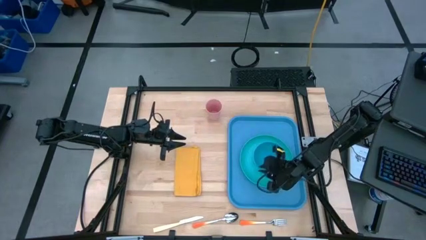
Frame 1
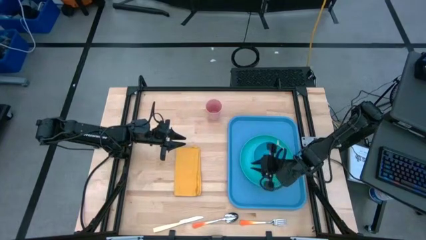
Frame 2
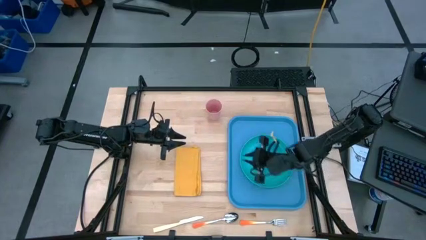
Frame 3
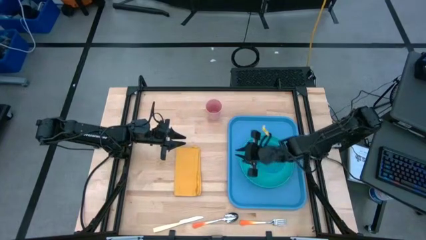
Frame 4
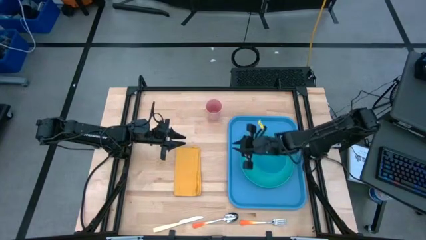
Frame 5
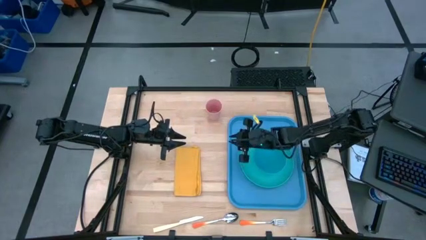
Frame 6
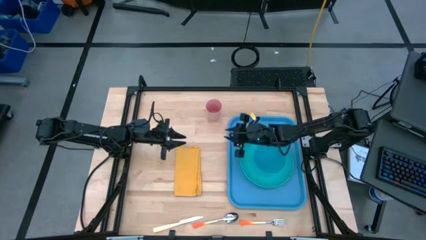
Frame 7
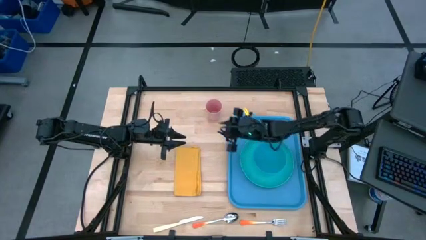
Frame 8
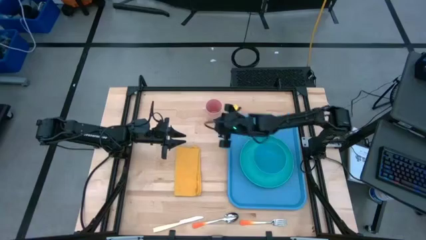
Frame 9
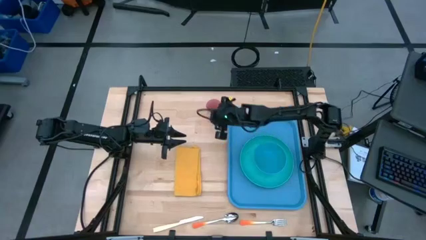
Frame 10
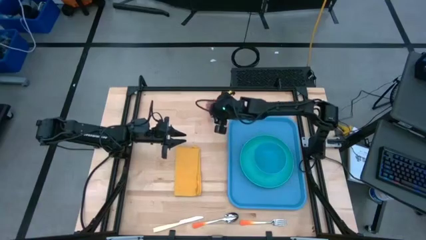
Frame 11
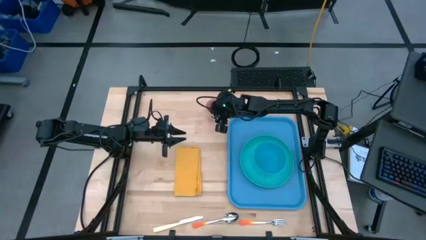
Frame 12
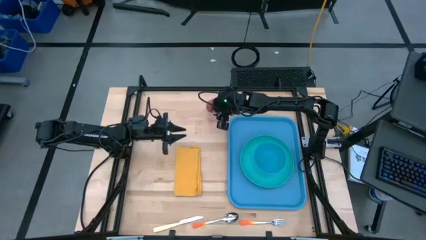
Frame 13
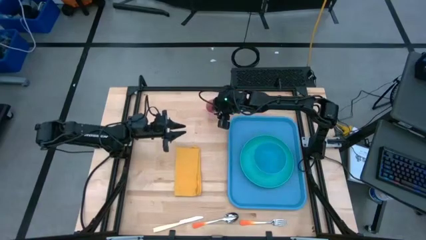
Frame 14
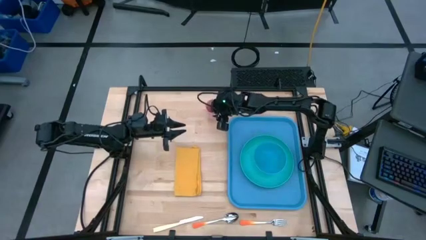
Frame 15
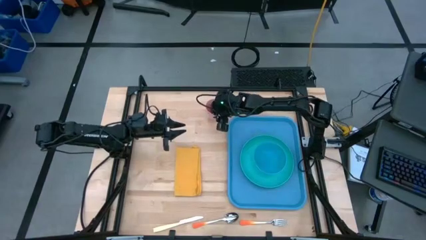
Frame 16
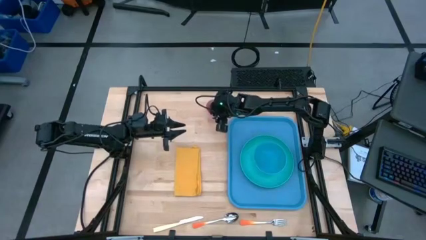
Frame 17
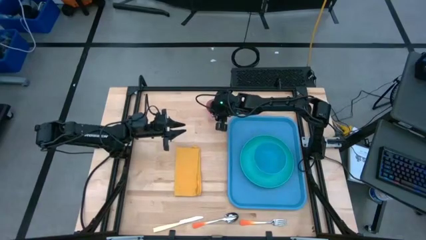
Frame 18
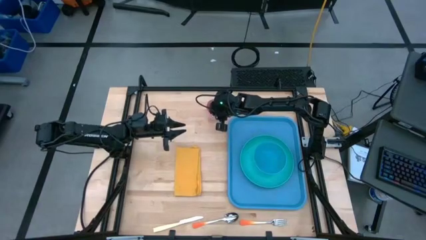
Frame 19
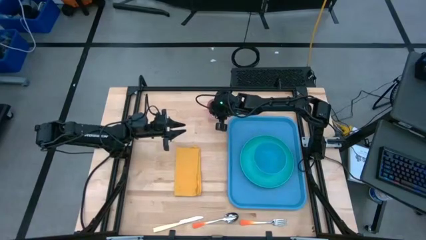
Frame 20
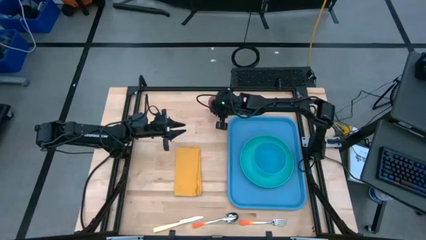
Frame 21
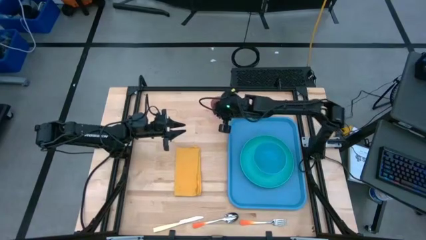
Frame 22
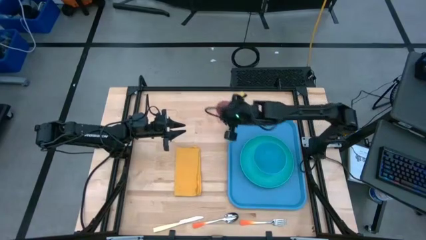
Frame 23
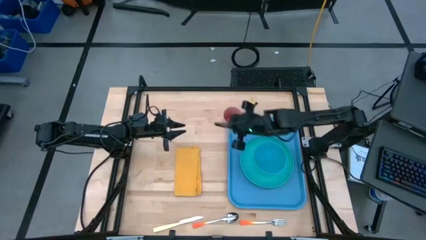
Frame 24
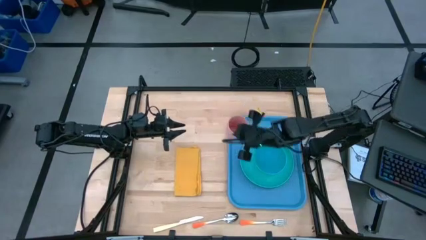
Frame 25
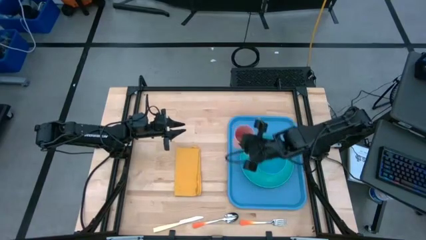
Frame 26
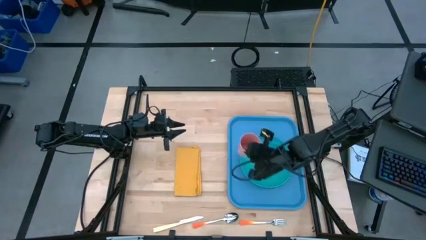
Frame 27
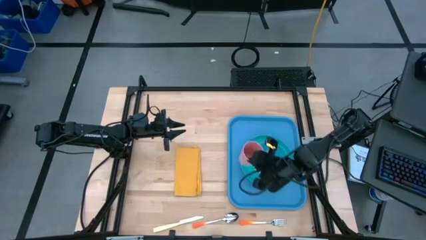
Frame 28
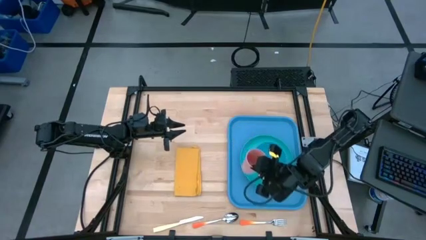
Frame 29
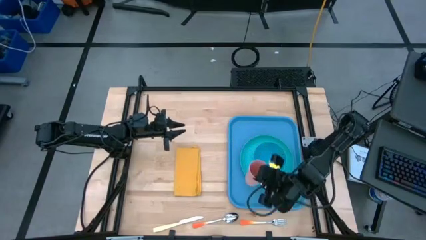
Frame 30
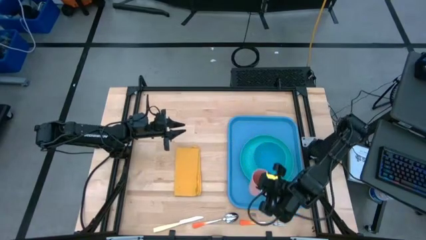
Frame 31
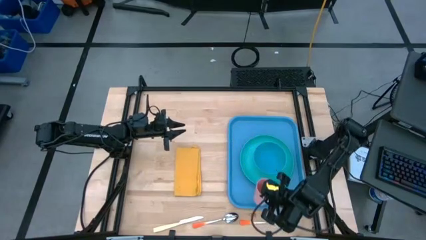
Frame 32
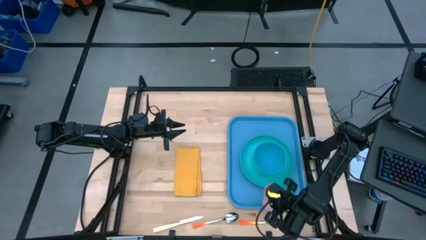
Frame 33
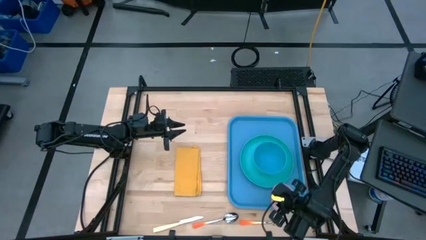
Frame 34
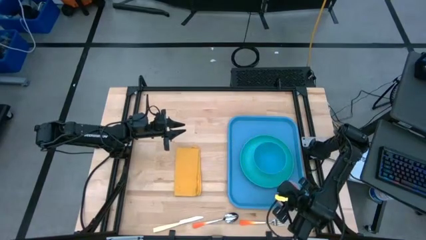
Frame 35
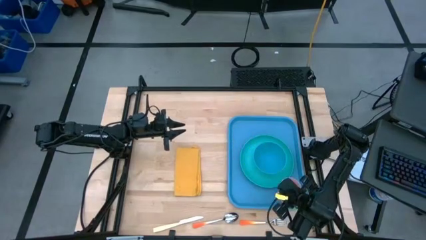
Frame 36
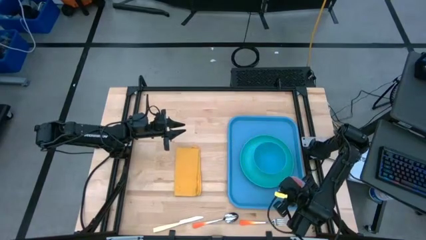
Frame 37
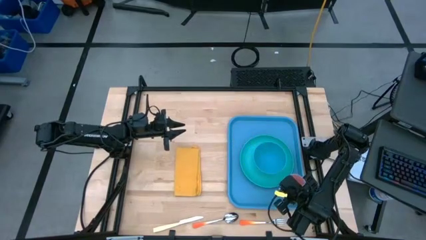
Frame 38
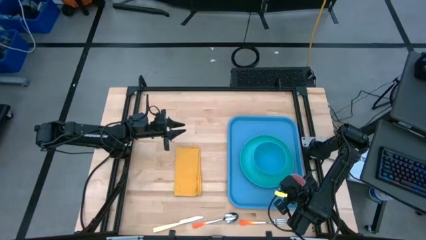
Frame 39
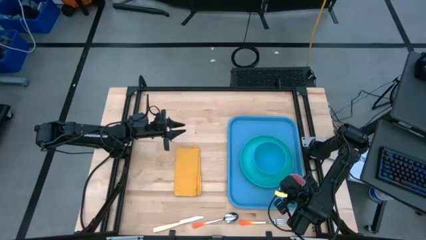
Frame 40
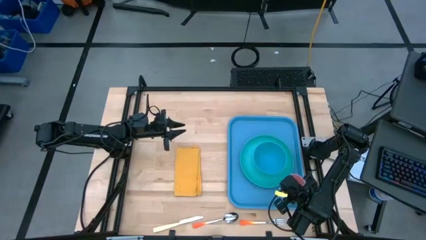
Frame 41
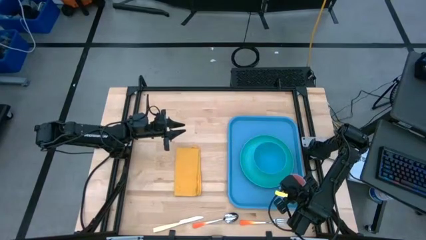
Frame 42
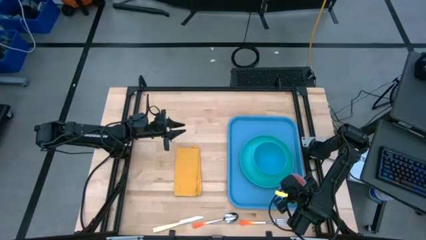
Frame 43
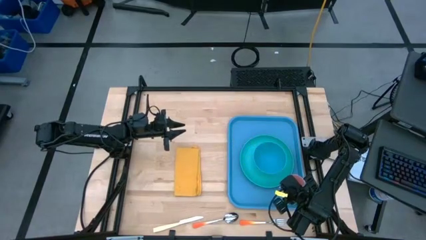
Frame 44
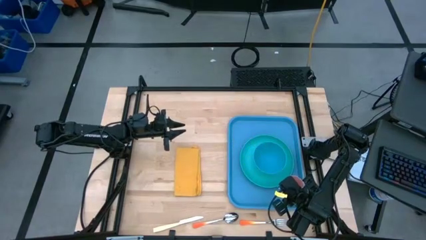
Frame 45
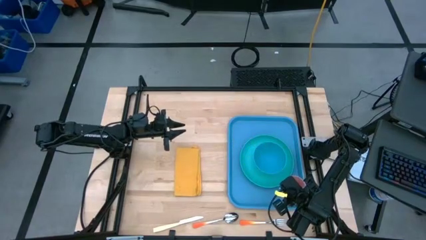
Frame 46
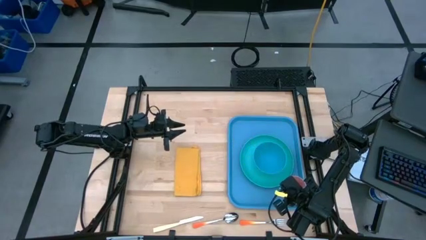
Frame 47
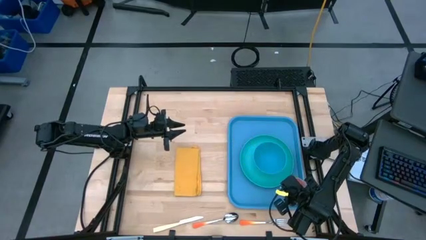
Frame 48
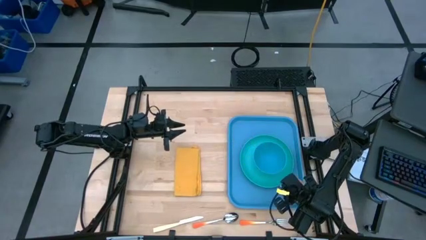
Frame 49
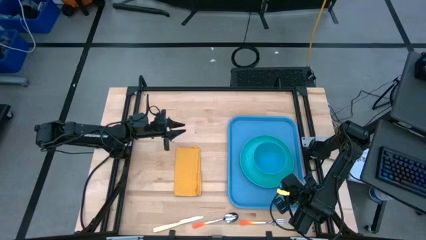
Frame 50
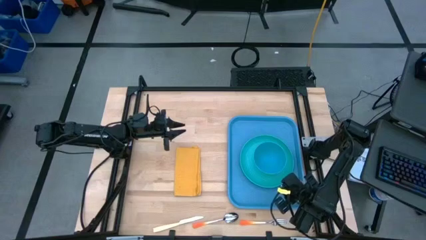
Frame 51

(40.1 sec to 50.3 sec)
Task: Set up tray
Put the pink cup on the tray to the top right of the blue plate
